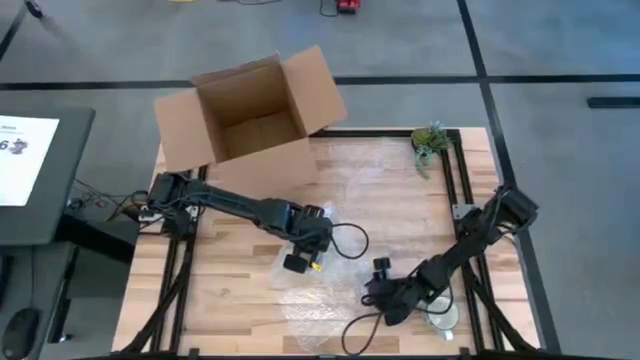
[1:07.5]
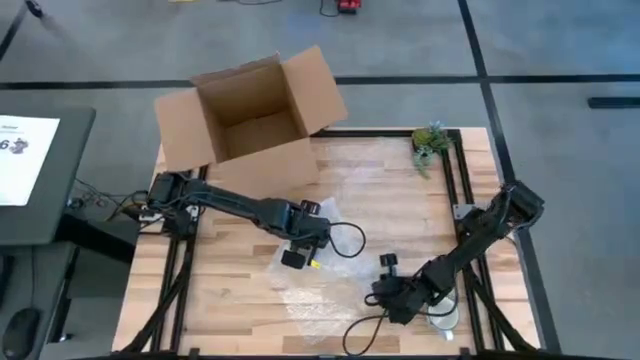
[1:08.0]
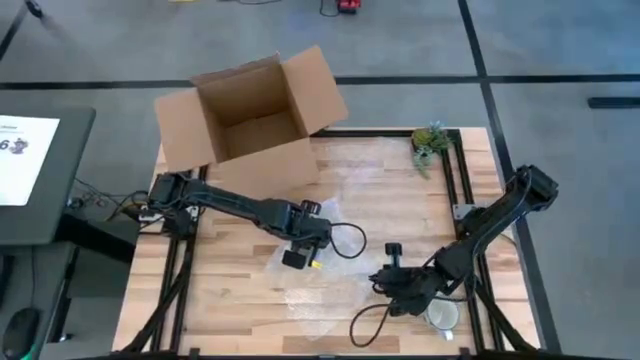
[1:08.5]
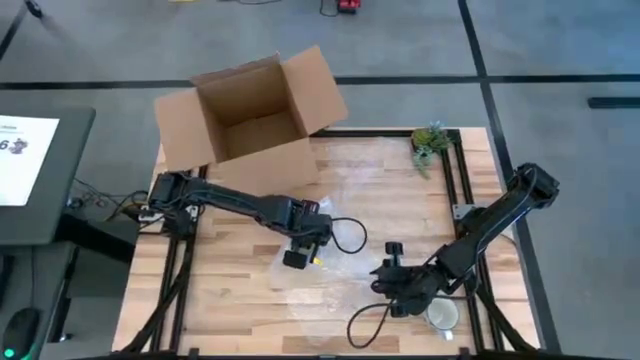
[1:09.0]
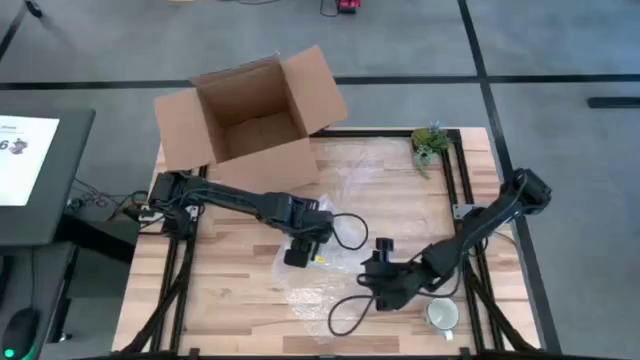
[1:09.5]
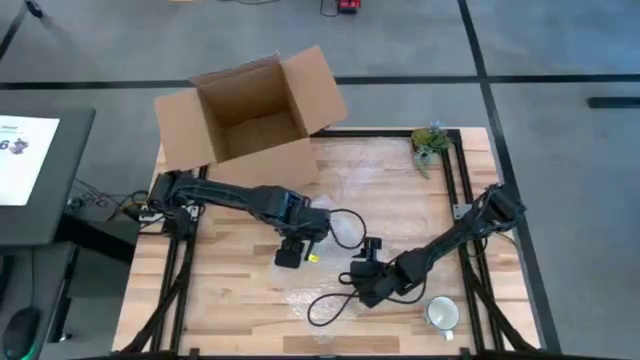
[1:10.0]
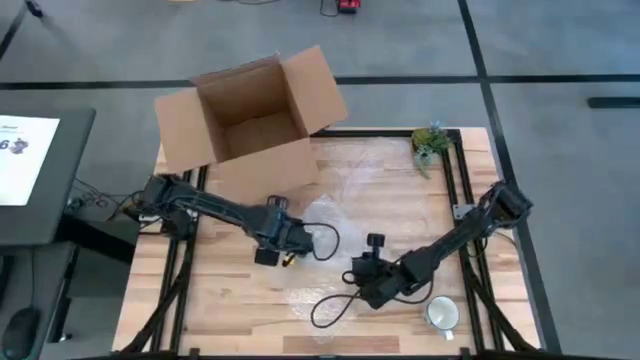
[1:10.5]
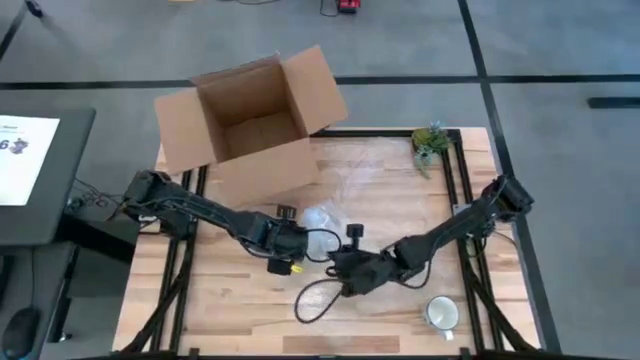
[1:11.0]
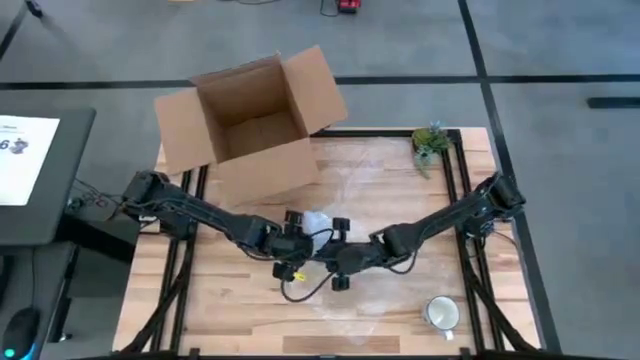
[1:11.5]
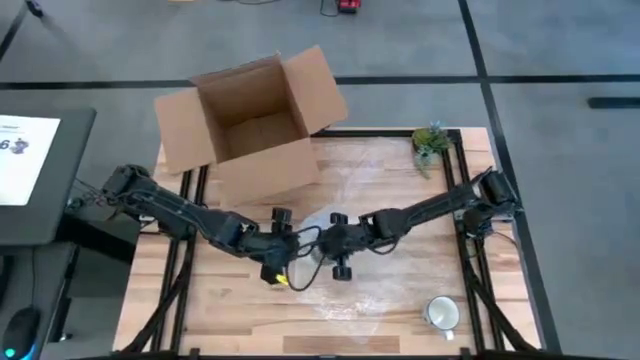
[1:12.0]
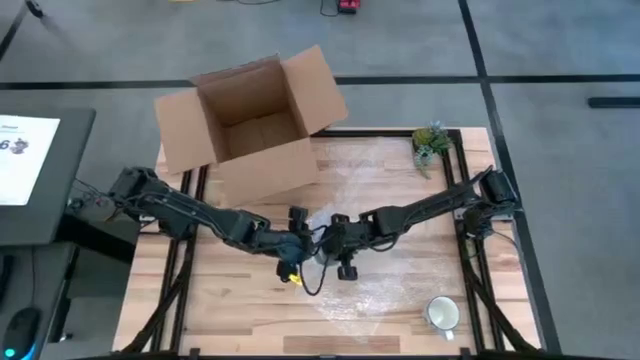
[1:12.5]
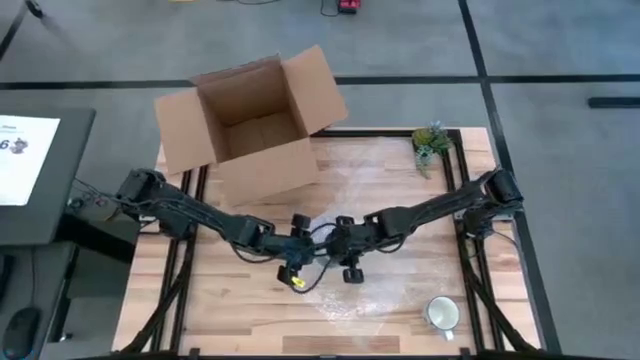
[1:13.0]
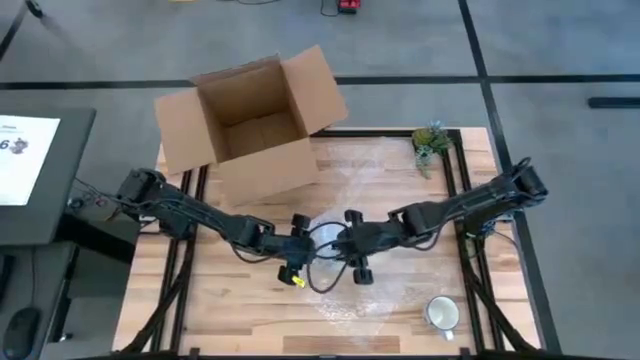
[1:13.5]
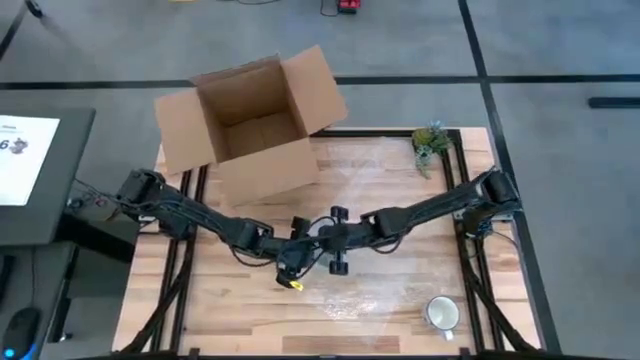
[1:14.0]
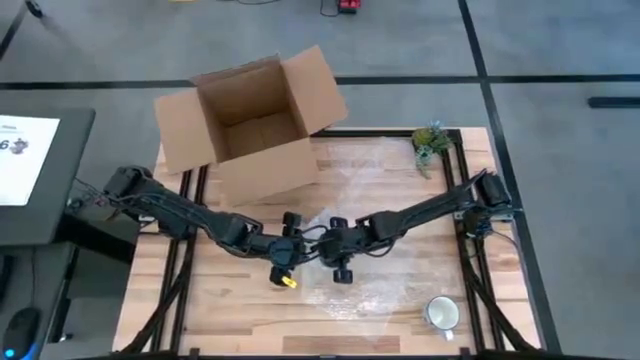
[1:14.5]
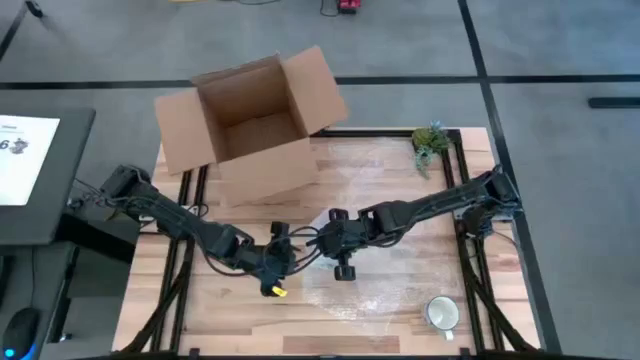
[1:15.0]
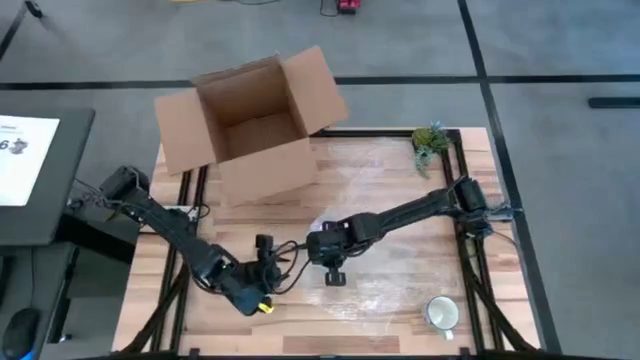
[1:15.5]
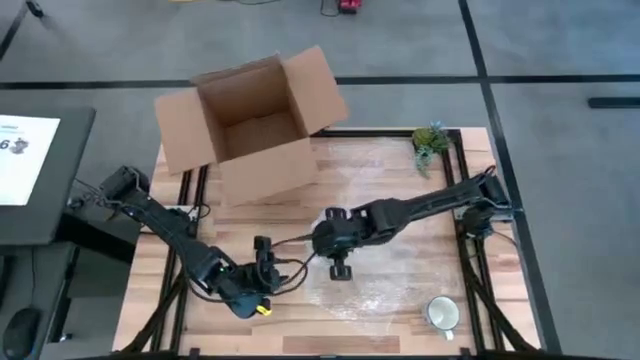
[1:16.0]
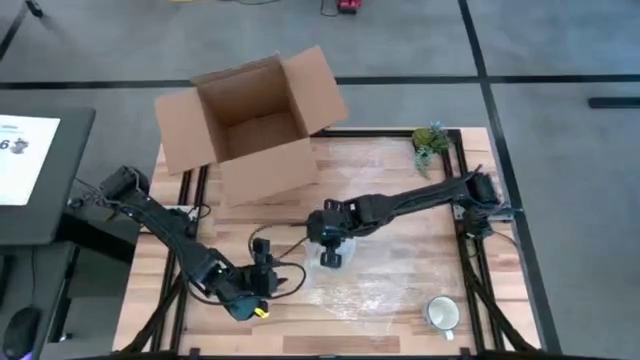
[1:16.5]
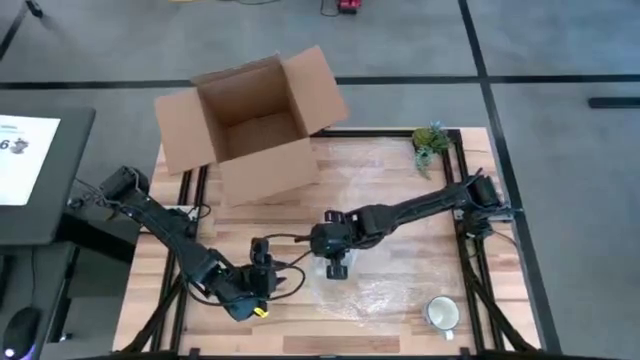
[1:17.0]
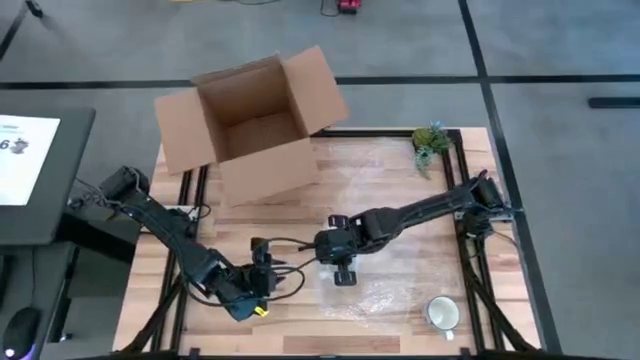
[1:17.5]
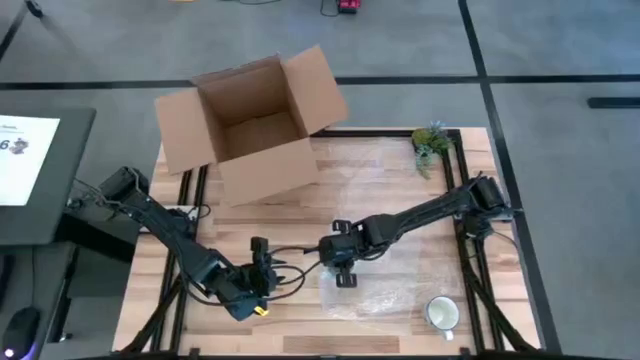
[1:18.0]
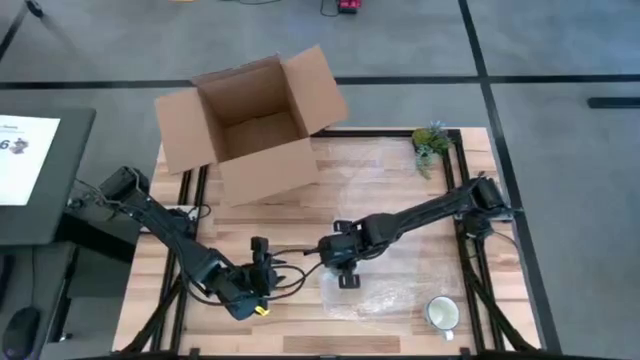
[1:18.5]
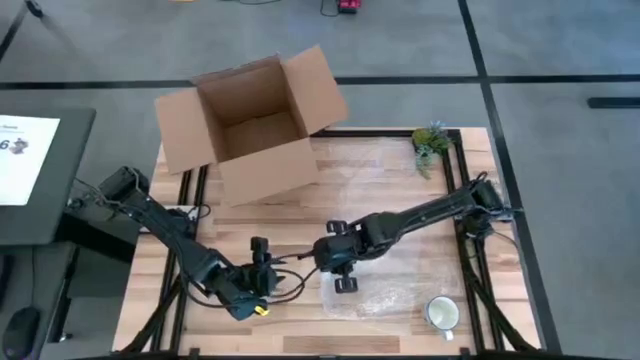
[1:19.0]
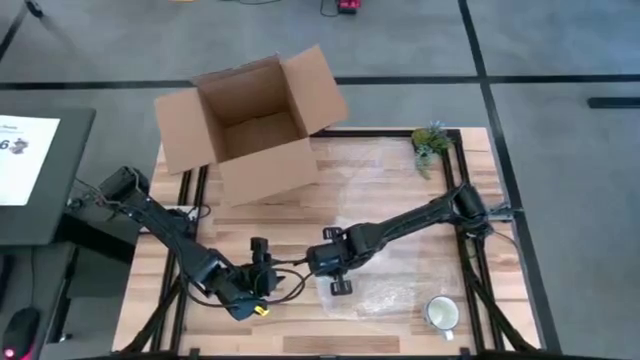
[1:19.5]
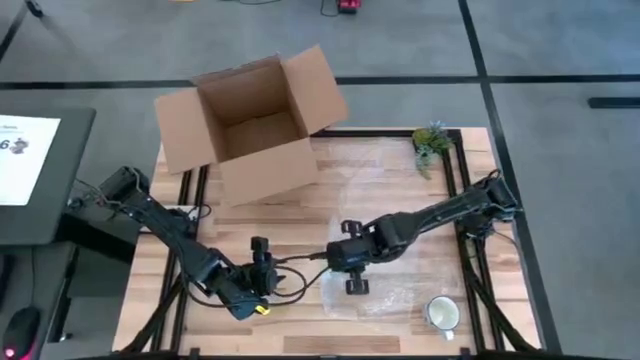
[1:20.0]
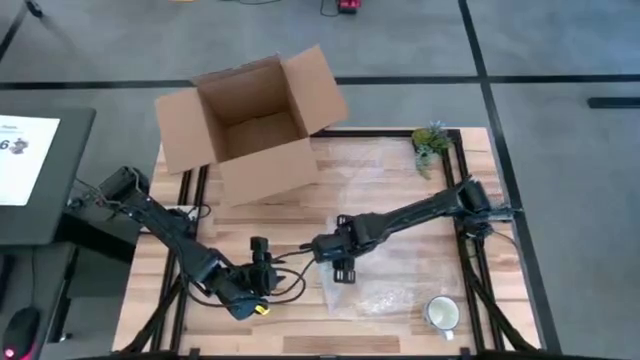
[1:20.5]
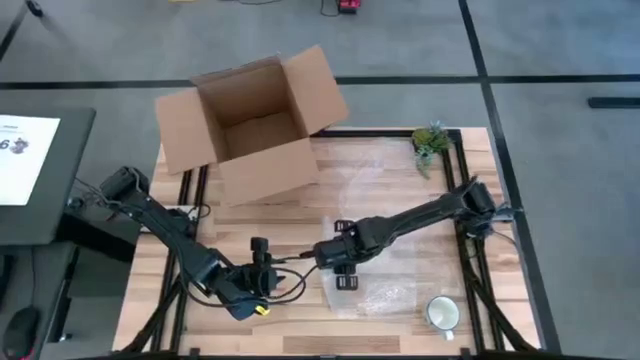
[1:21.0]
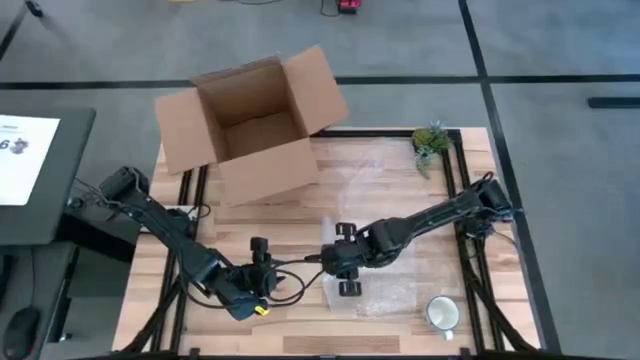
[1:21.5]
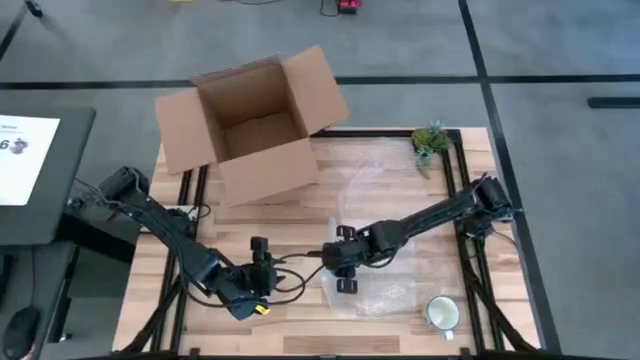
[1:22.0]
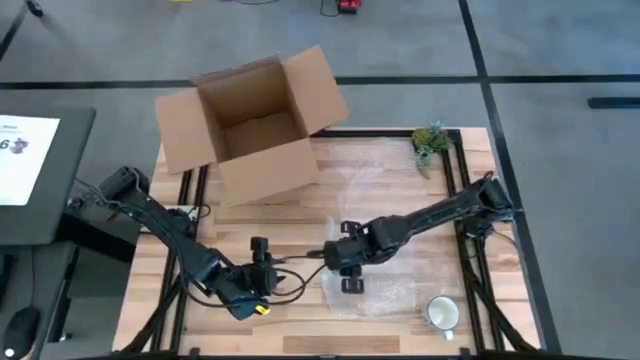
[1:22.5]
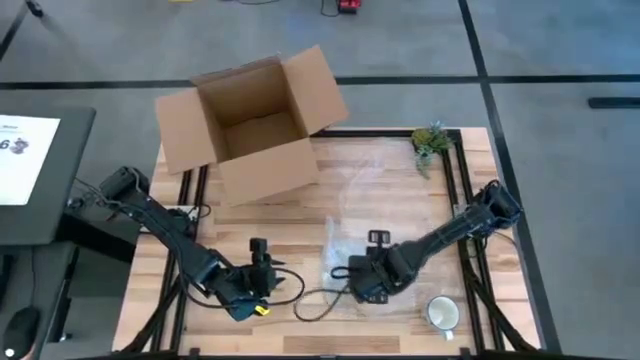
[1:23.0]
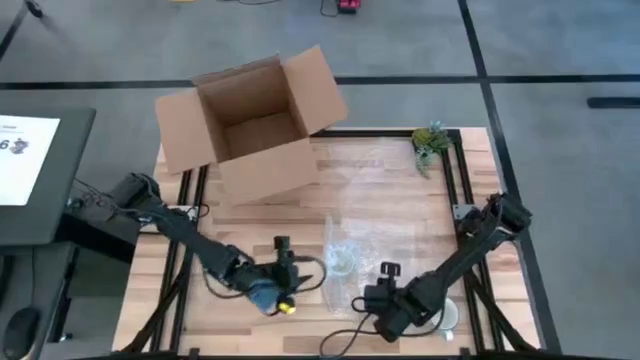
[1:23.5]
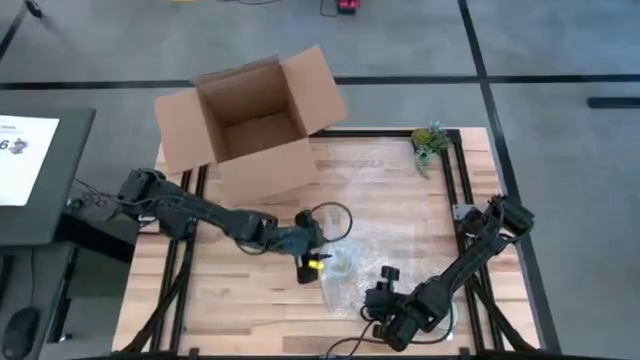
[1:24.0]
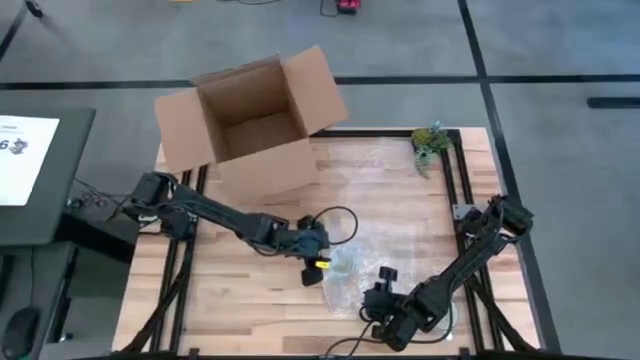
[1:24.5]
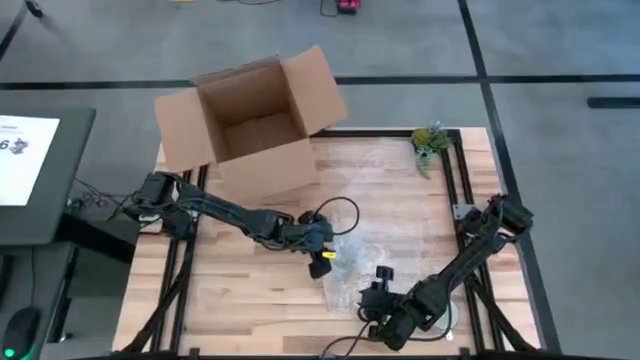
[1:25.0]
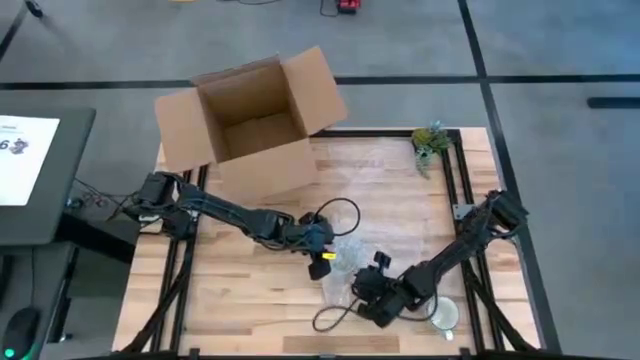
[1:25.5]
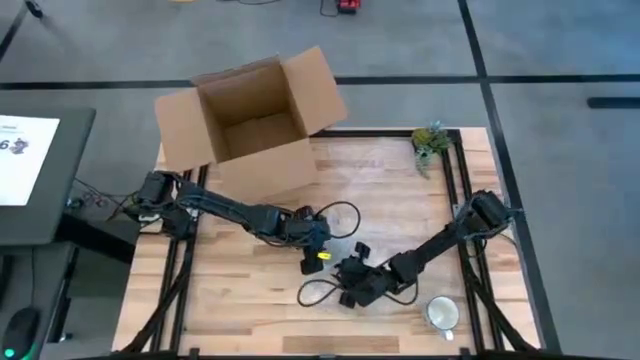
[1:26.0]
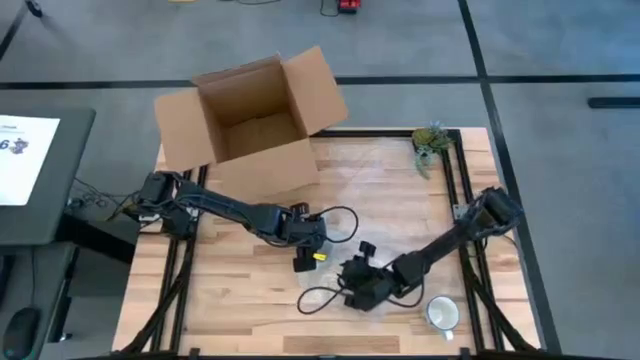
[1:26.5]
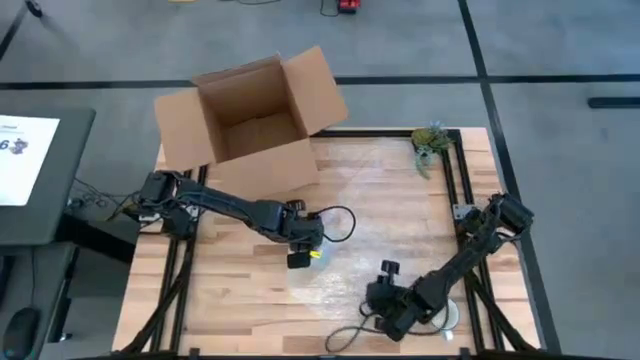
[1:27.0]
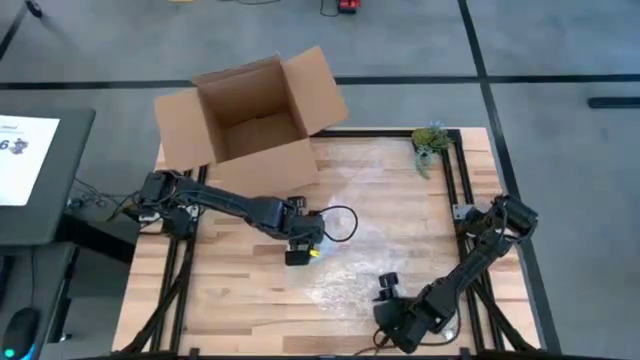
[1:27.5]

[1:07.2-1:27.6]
Task: wrap mug
Wrap the green patterned mug with the bubble wrap

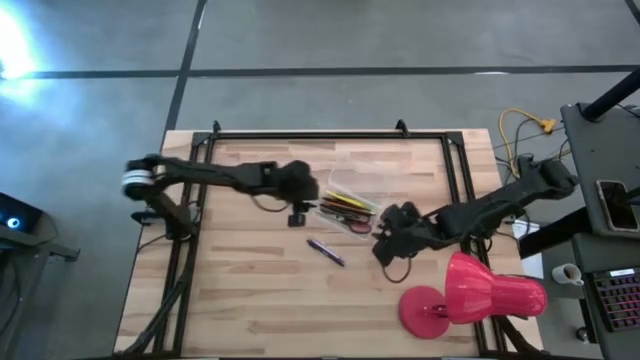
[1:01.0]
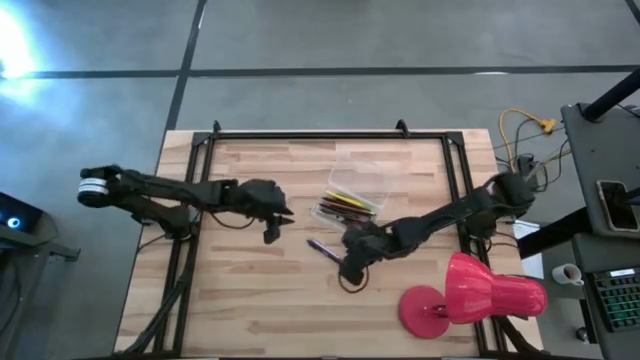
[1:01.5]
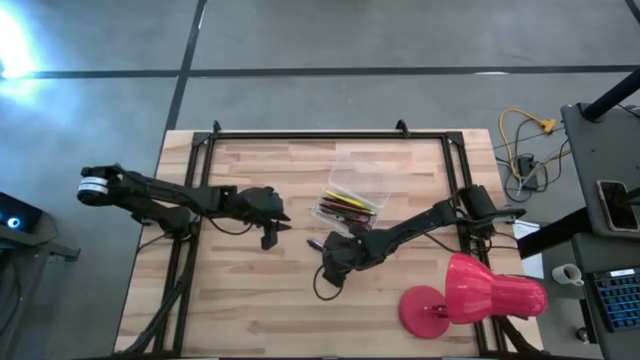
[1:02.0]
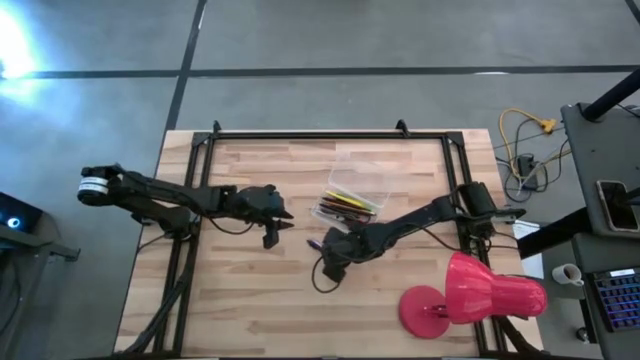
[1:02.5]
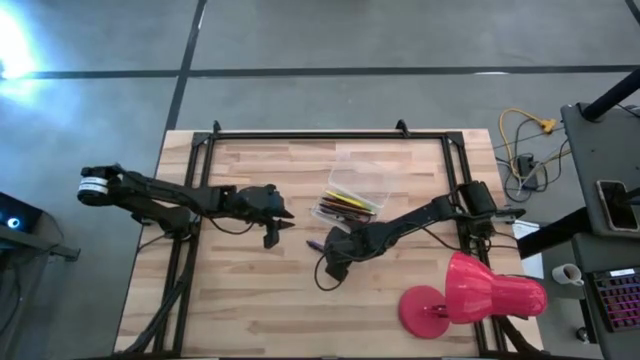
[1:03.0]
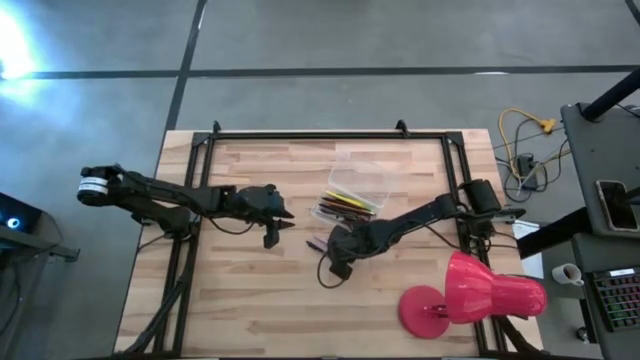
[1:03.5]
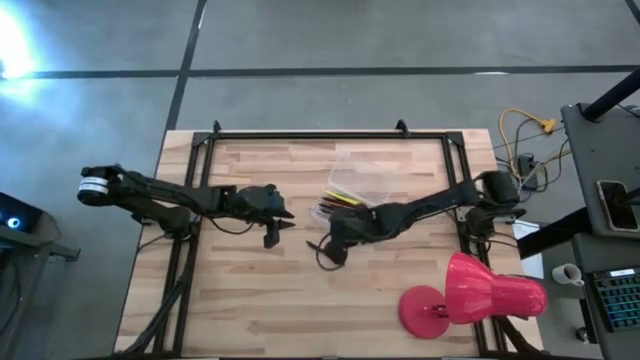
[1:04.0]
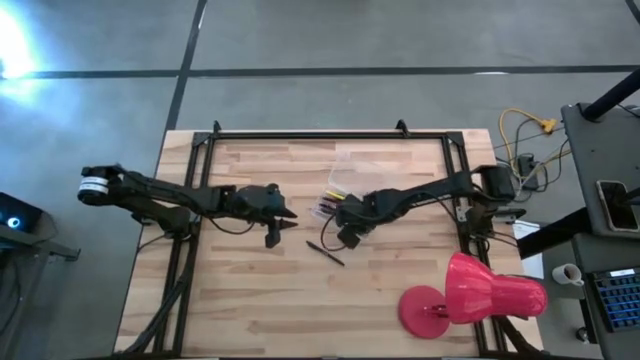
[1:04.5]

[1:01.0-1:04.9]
Task: Pick & place school supplies into a supply box
Put the violet pen into the transparent supply box
